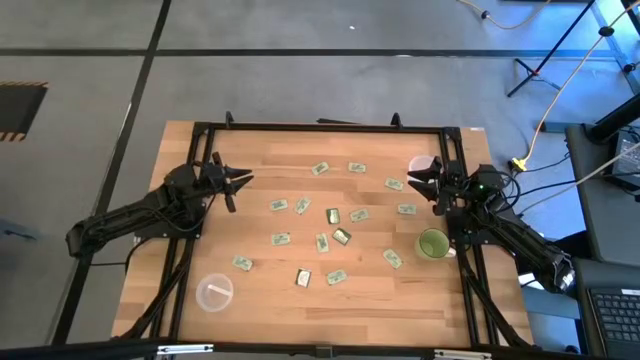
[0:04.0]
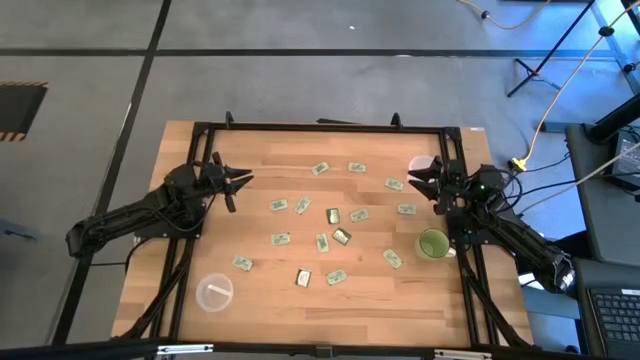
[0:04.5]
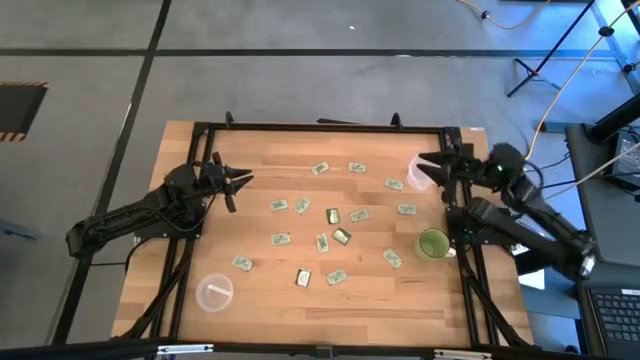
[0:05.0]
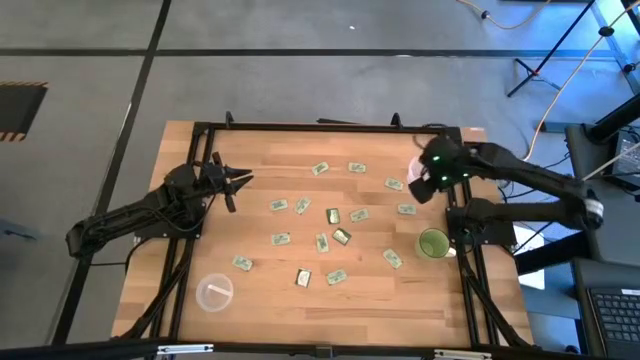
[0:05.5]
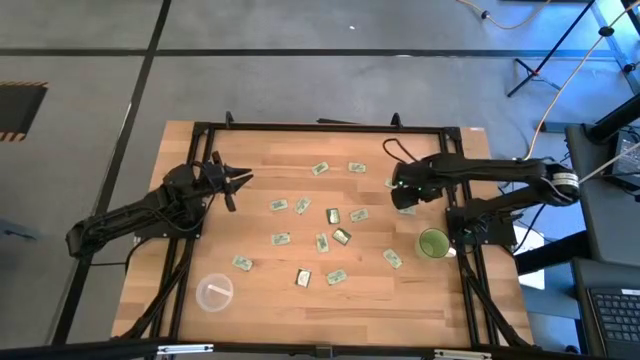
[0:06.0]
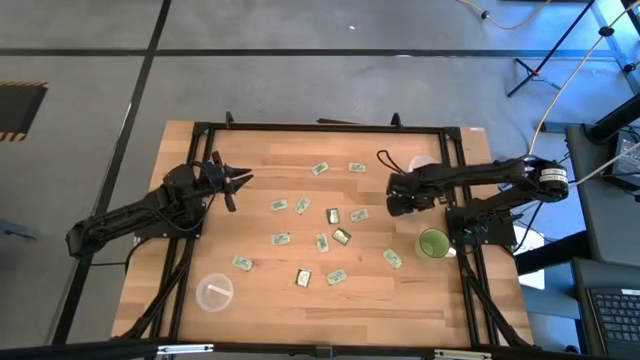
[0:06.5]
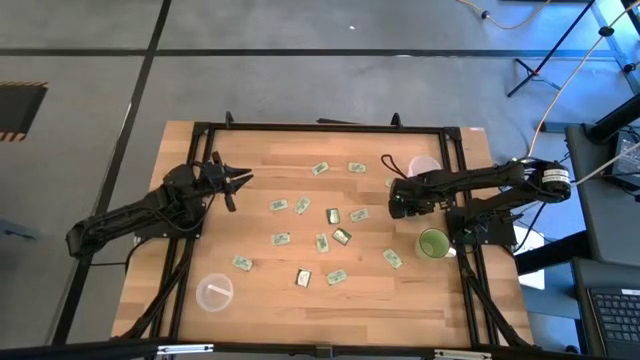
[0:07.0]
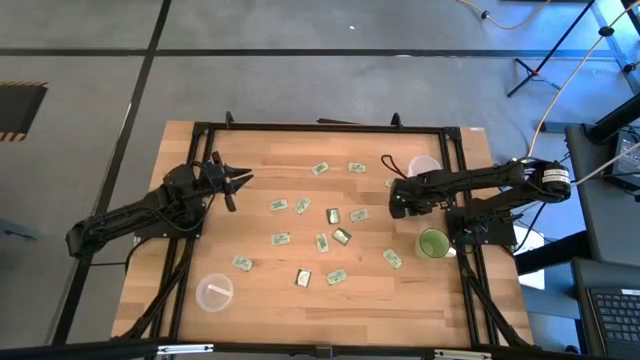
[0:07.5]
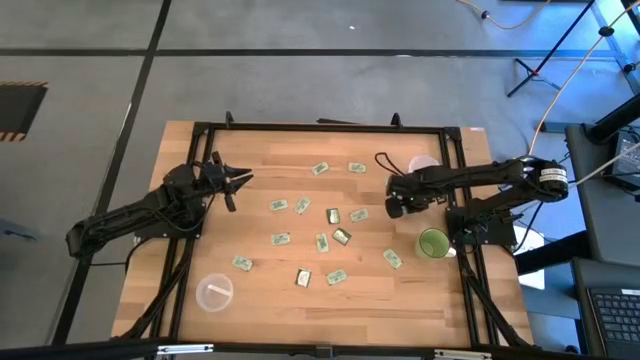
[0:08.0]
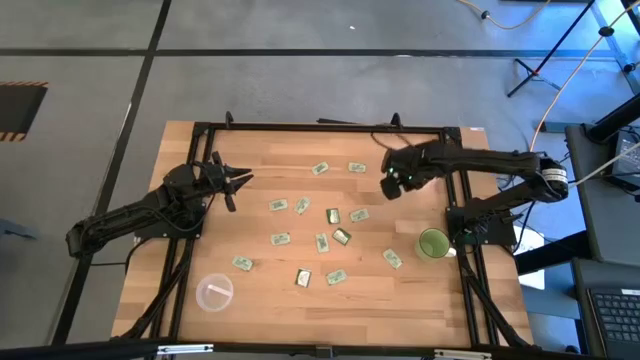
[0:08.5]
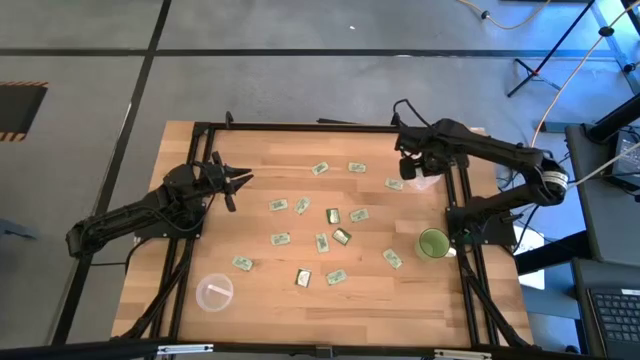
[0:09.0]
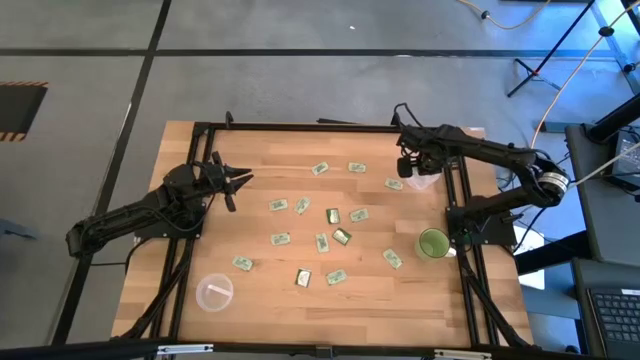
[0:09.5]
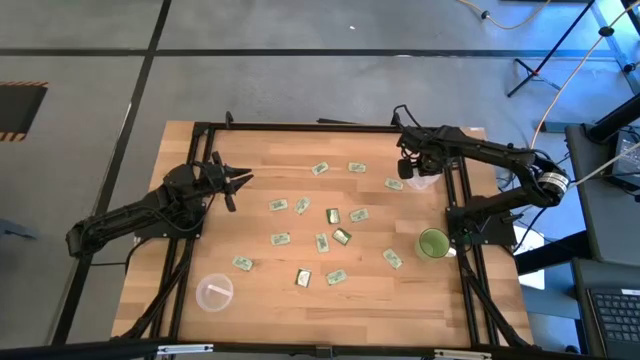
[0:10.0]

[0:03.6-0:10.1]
Task: Pick and place items into bin
Put the white stevia packet into the top white bin

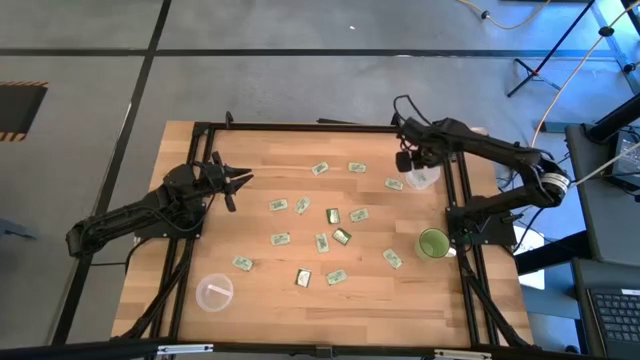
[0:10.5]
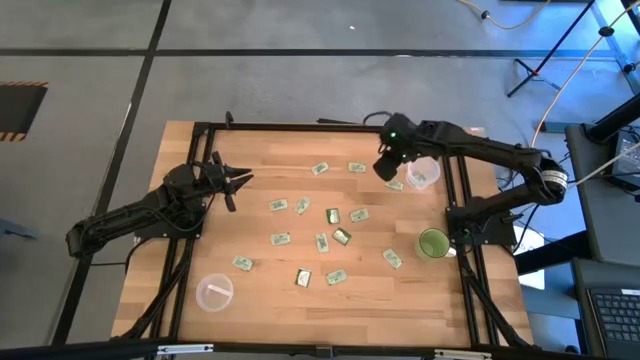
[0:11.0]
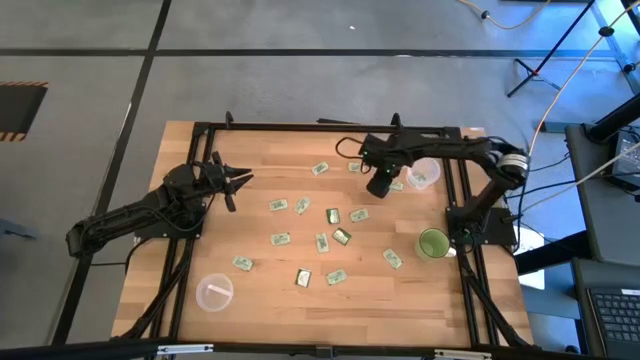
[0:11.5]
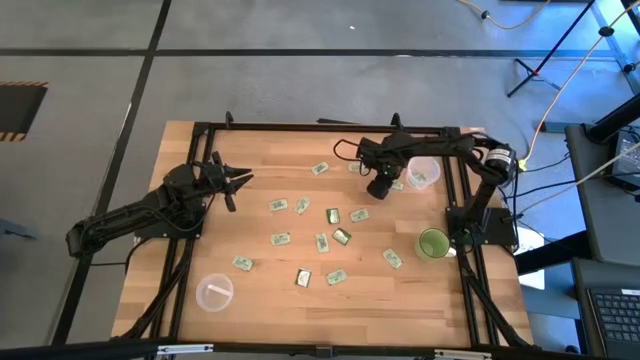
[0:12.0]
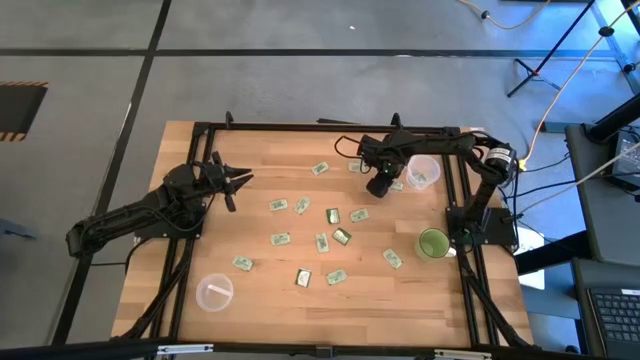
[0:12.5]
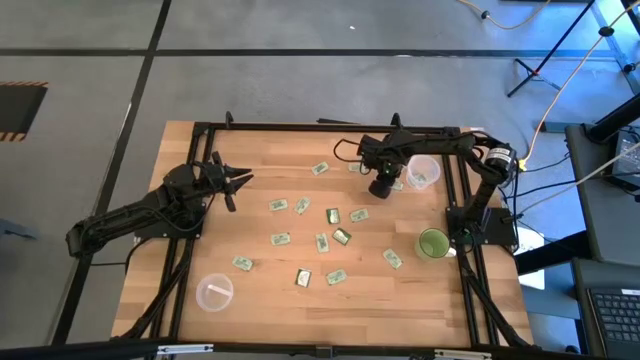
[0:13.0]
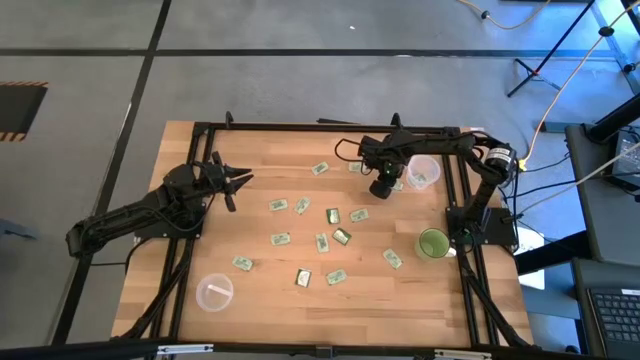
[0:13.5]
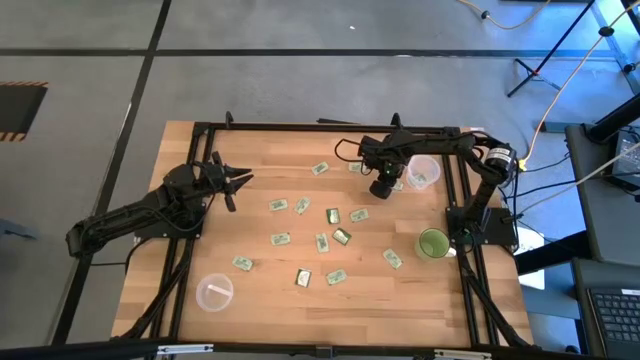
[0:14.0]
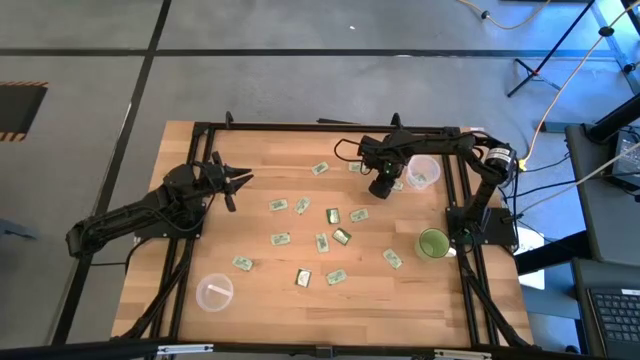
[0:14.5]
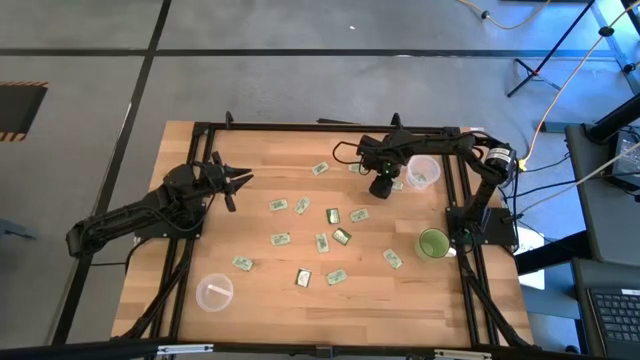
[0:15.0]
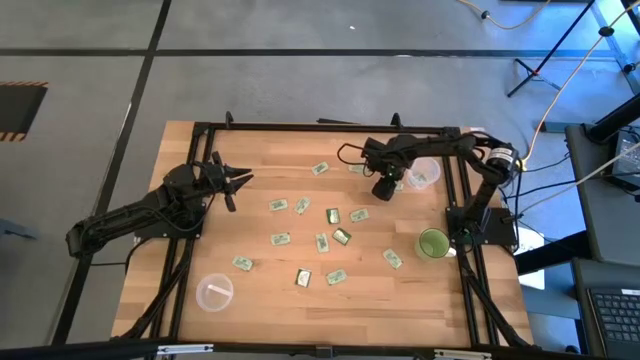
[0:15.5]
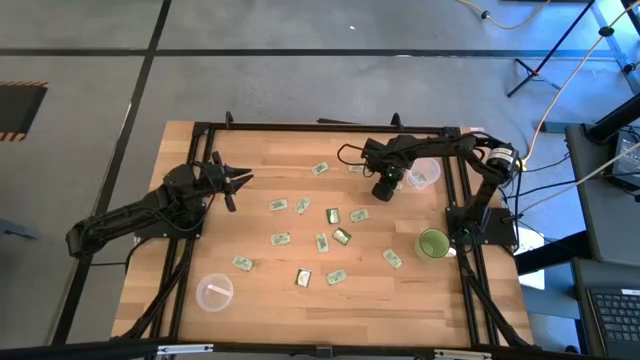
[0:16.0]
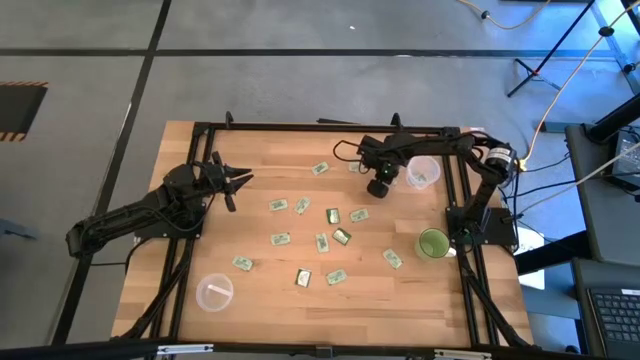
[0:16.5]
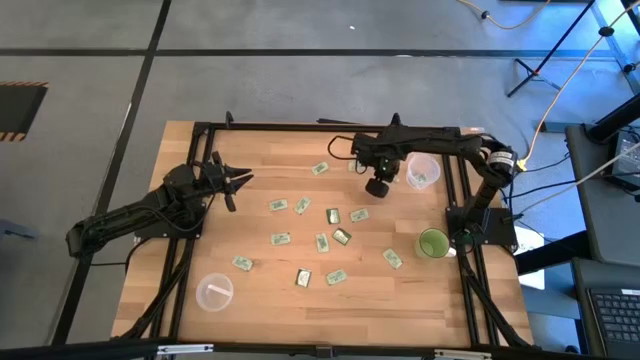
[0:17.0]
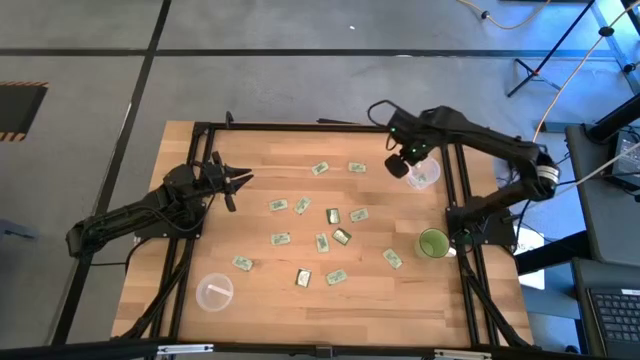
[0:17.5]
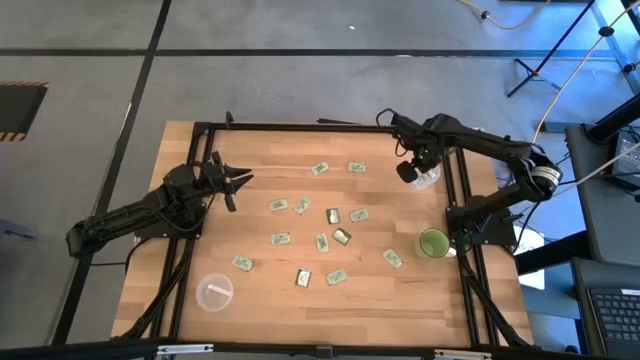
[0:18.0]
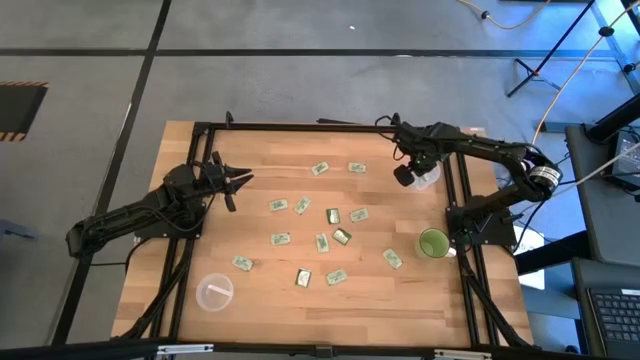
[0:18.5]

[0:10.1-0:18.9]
Put the white stevia packet into the top white bin

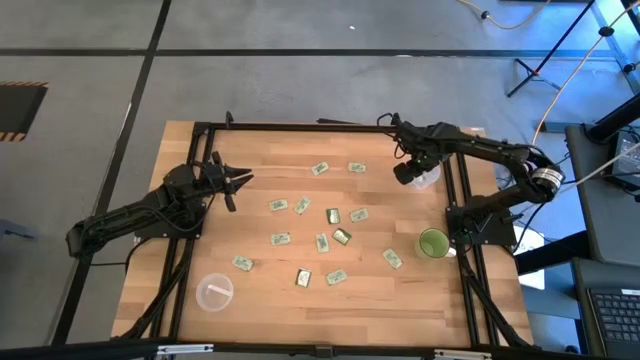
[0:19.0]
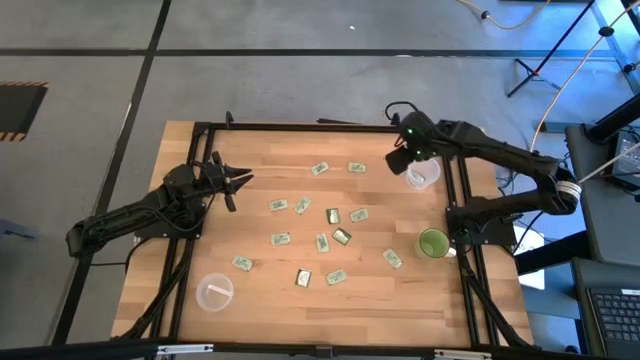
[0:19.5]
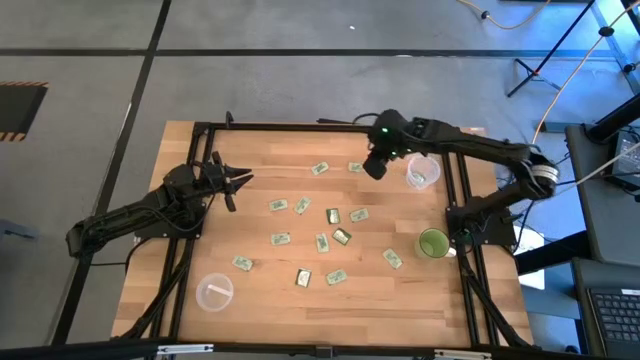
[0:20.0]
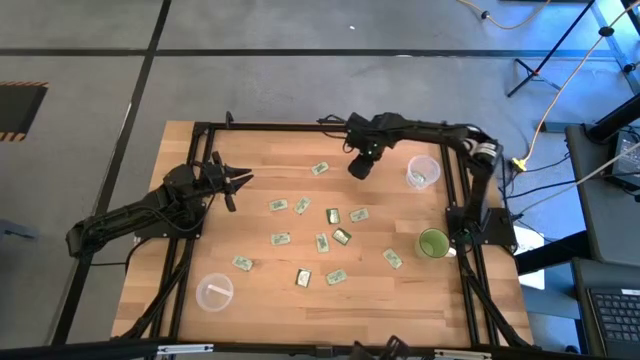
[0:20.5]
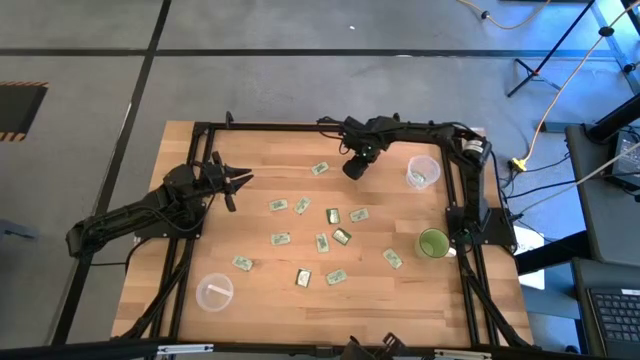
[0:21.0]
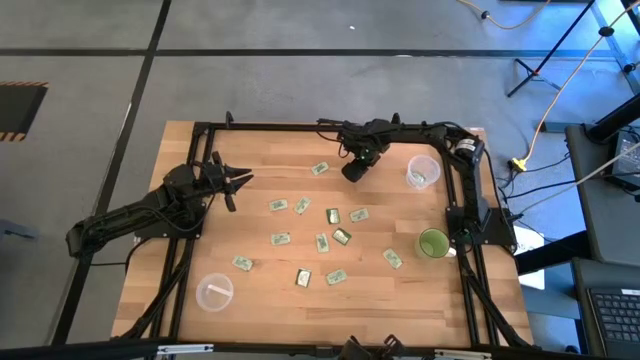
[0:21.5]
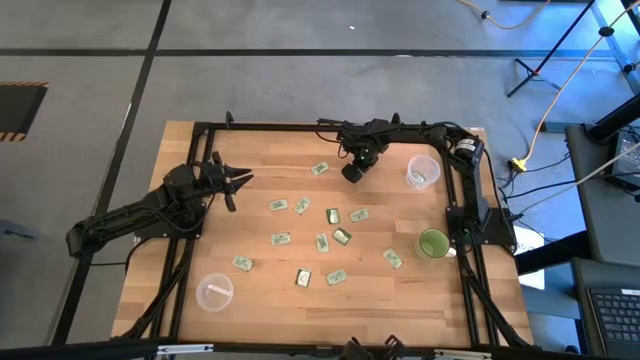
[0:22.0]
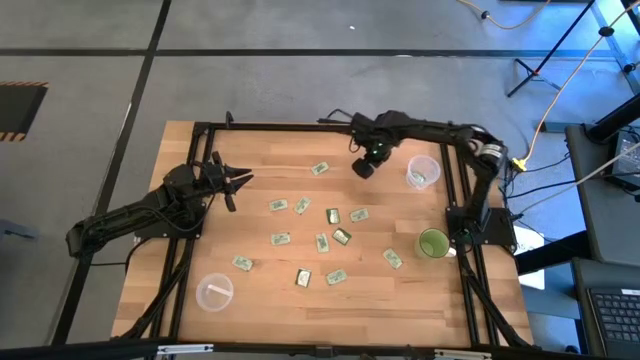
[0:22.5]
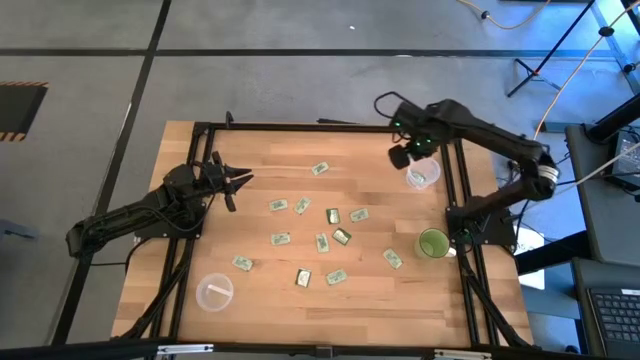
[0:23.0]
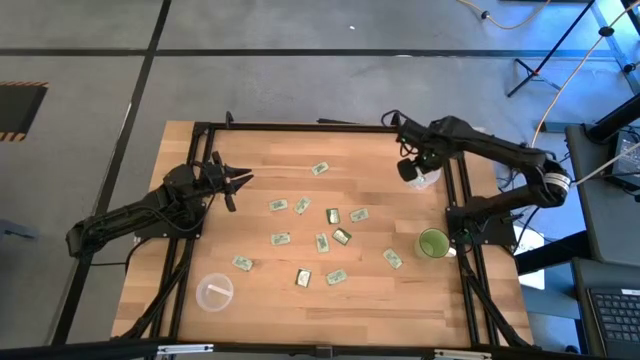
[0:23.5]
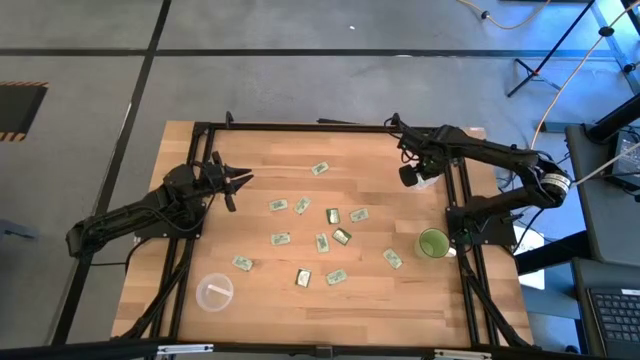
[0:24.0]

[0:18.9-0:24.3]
Put the white stevia packet into the top white bin
